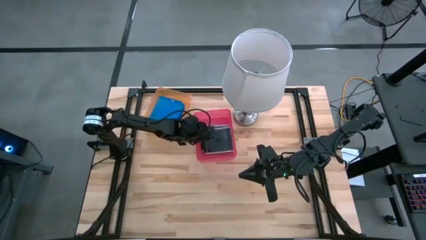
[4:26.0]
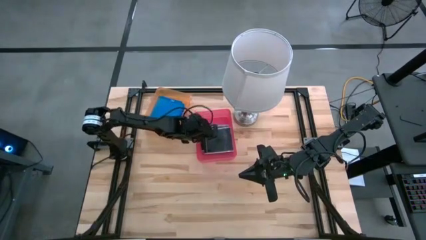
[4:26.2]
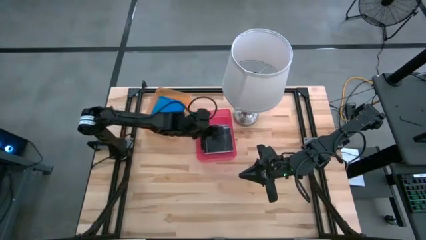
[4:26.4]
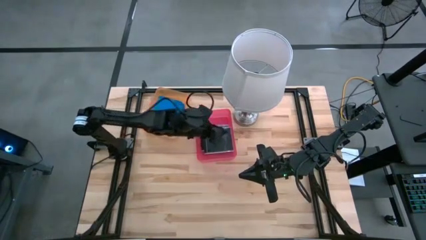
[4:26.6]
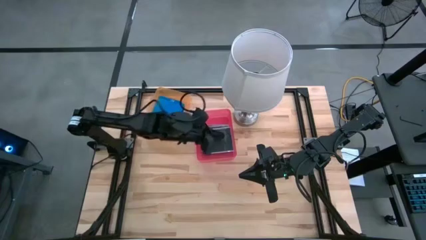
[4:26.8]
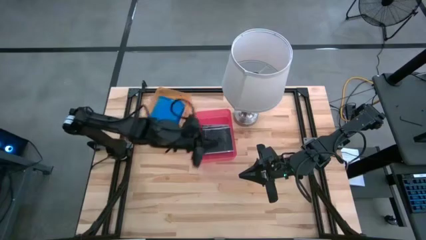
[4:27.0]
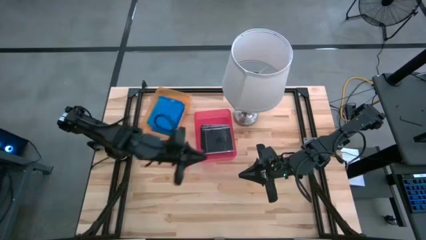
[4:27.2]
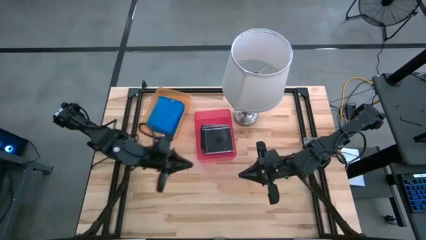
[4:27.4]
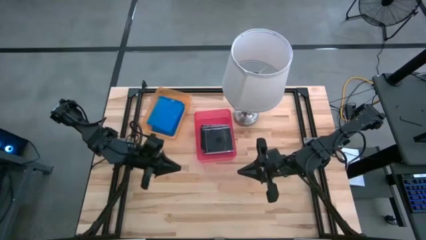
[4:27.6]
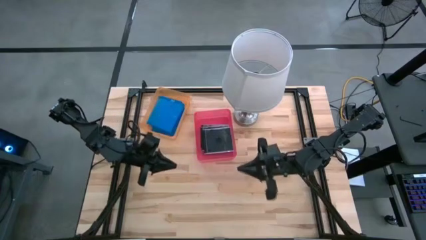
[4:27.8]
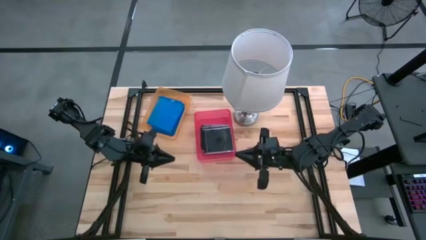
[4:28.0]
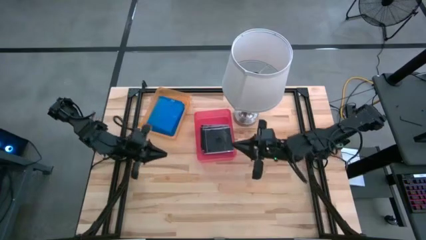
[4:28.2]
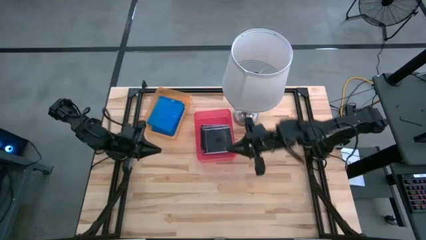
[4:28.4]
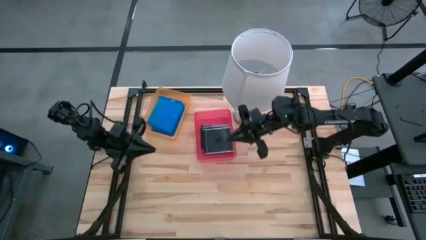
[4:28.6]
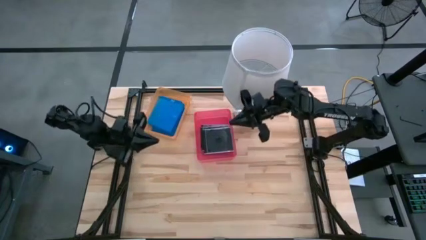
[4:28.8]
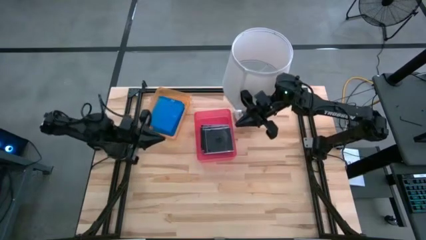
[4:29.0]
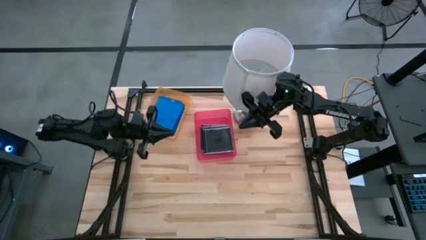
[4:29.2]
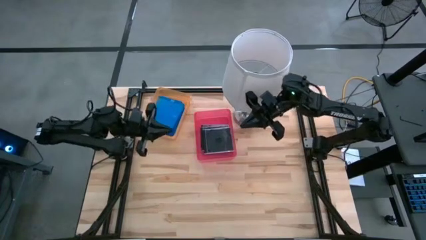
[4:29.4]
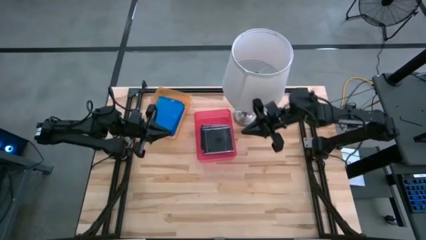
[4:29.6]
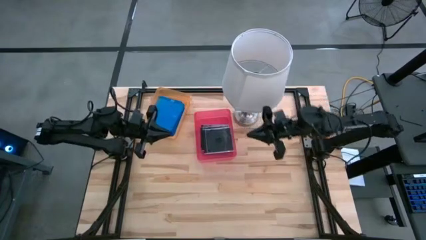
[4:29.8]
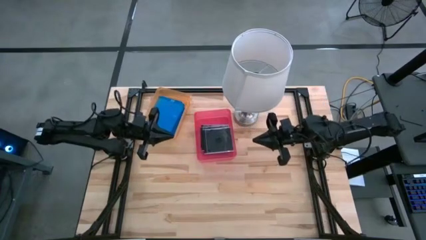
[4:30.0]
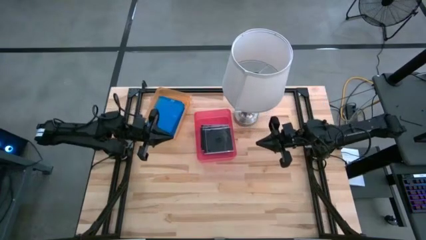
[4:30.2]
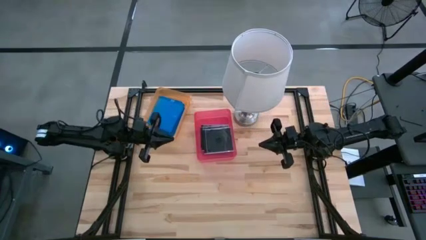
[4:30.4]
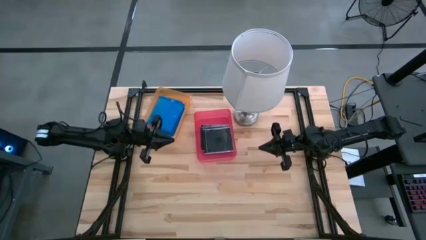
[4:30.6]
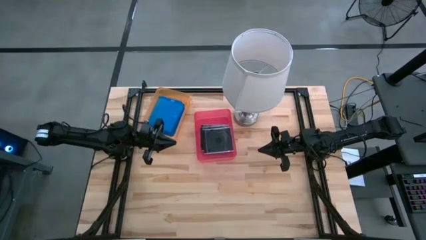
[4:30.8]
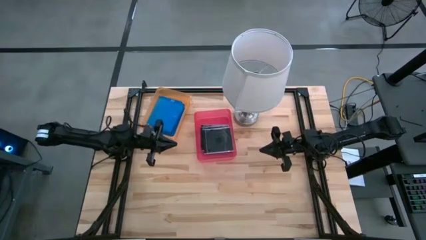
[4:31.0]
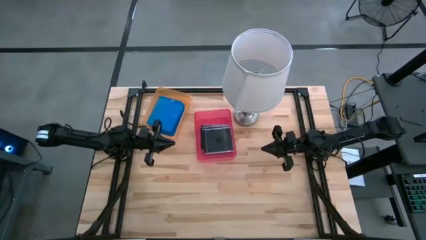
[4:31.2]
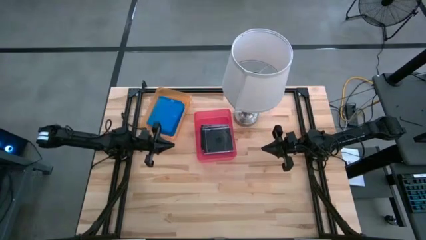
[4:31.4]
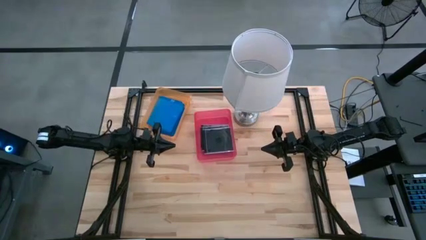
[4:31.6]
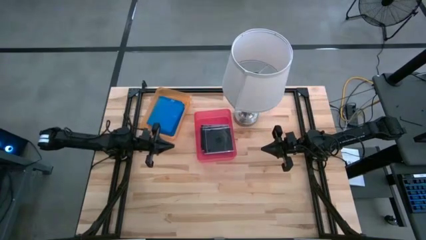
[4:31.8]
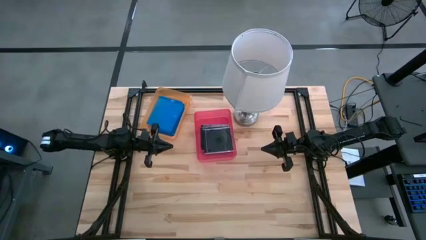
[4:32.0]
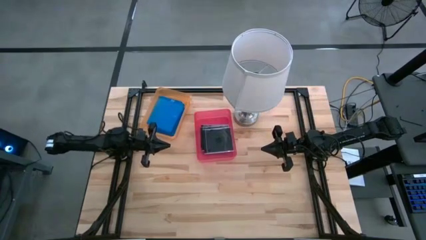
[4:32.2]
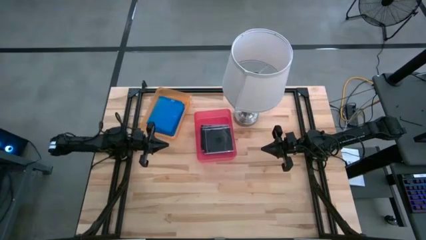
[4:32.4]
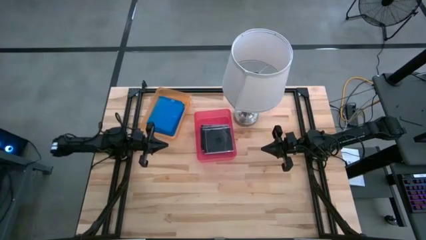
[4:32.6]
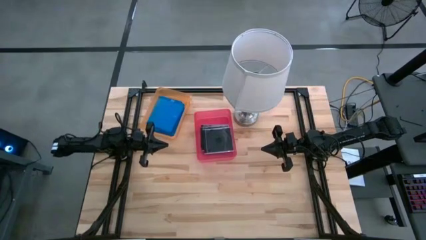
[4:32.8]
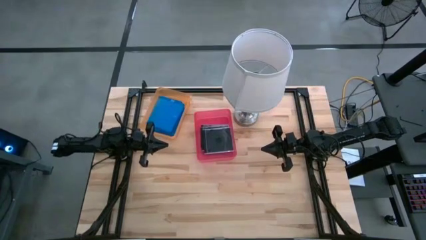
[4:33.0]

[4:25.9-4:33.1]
Task: Pick & place jewel cases by type
Return to Home Position

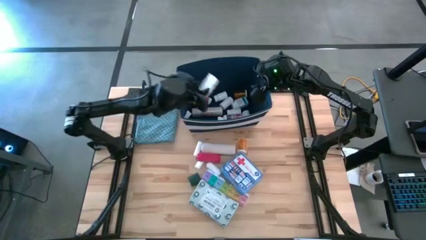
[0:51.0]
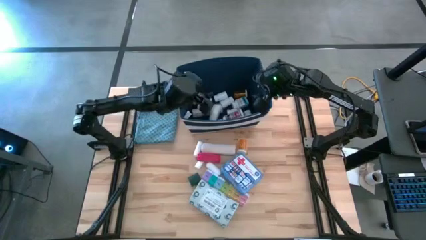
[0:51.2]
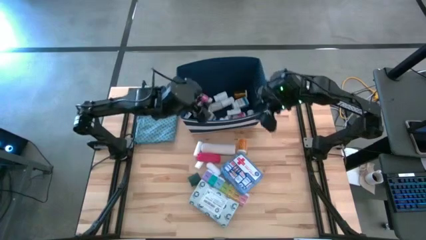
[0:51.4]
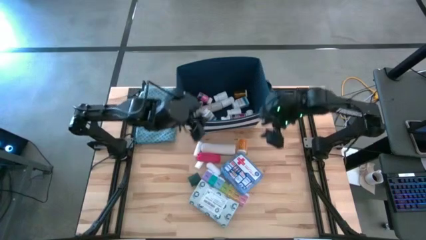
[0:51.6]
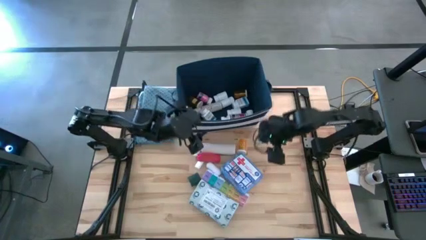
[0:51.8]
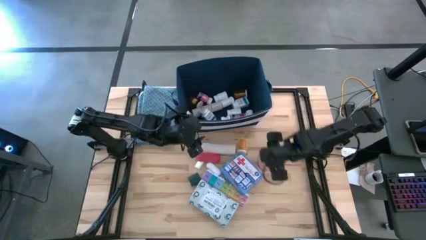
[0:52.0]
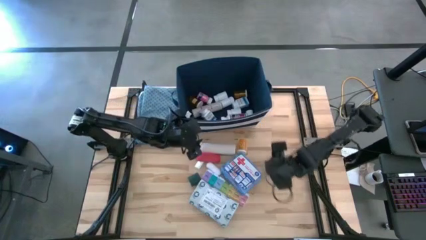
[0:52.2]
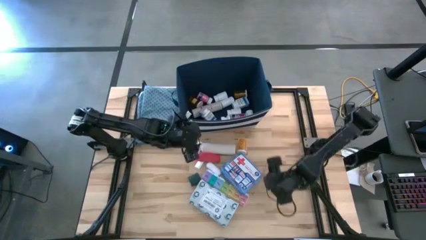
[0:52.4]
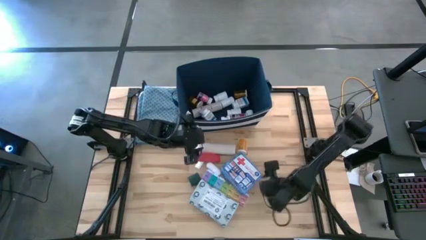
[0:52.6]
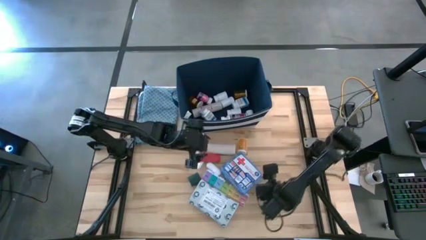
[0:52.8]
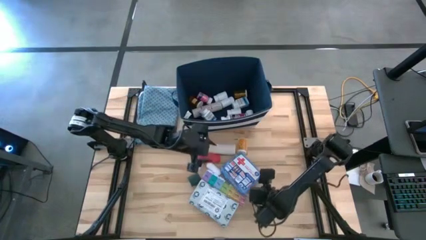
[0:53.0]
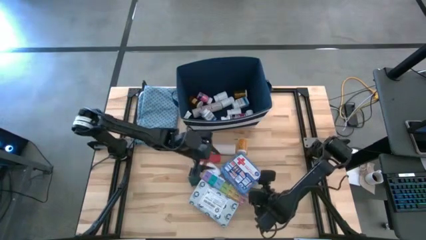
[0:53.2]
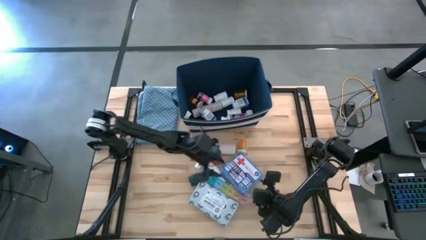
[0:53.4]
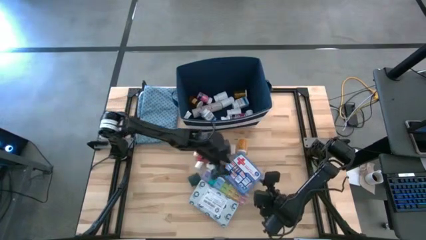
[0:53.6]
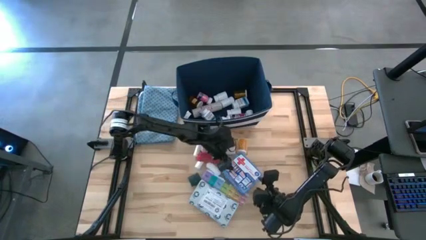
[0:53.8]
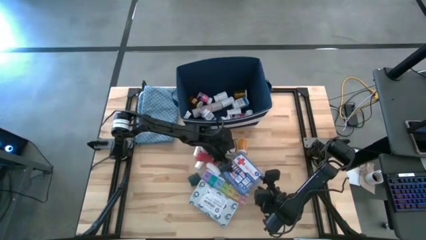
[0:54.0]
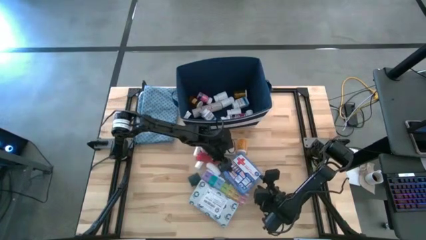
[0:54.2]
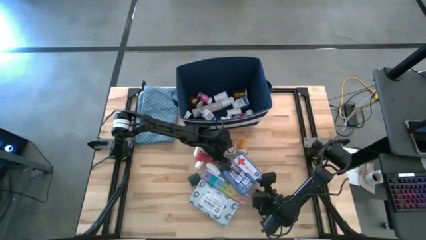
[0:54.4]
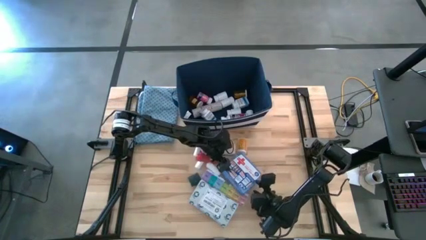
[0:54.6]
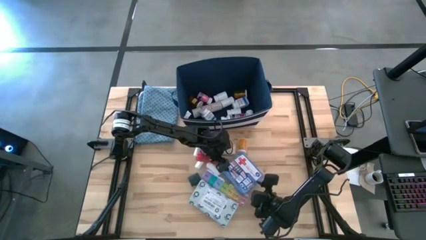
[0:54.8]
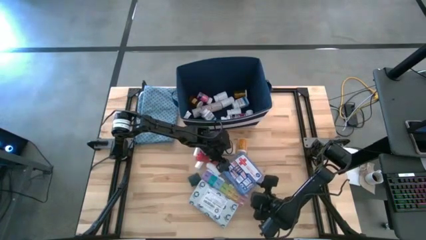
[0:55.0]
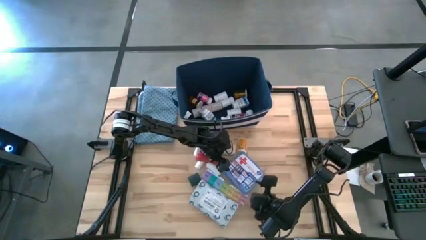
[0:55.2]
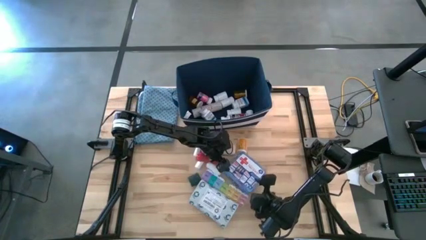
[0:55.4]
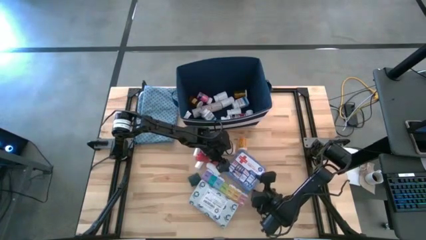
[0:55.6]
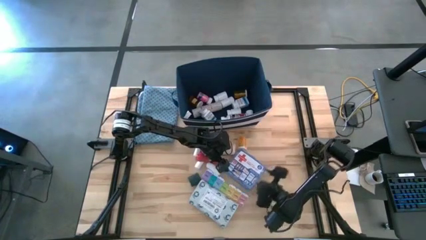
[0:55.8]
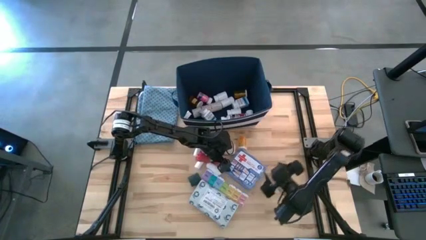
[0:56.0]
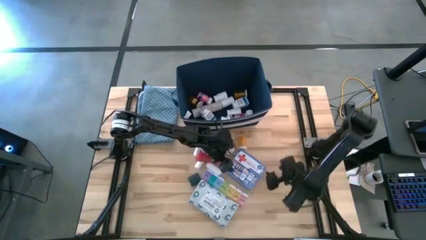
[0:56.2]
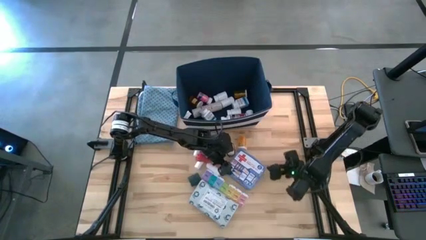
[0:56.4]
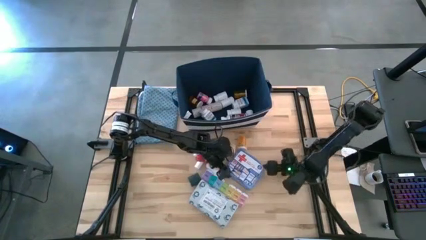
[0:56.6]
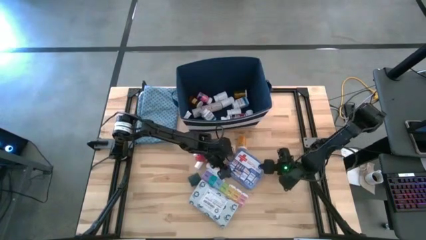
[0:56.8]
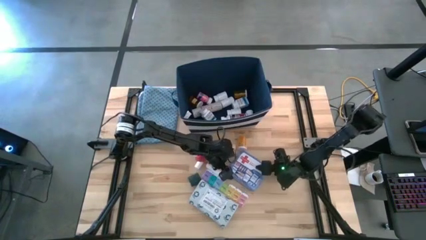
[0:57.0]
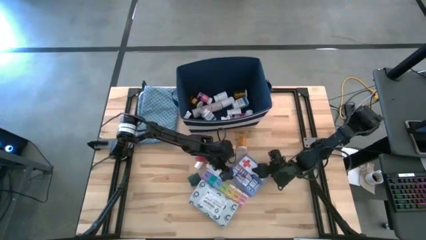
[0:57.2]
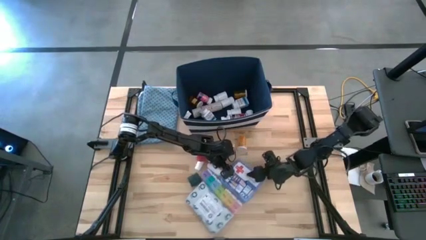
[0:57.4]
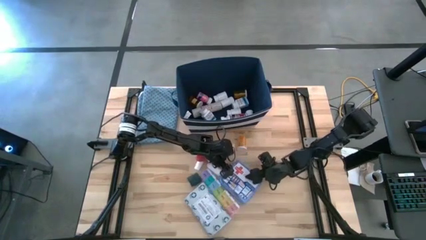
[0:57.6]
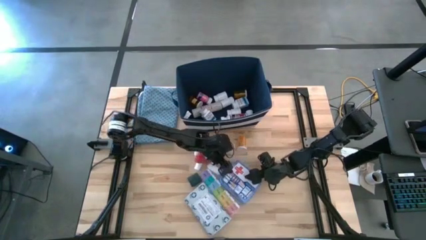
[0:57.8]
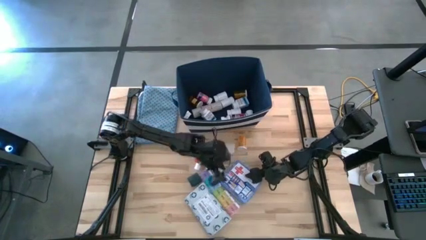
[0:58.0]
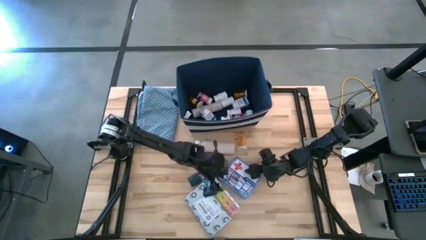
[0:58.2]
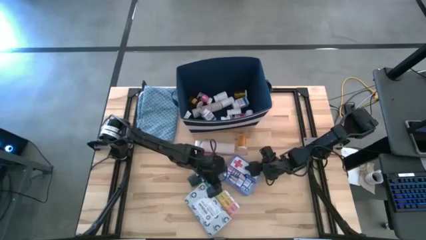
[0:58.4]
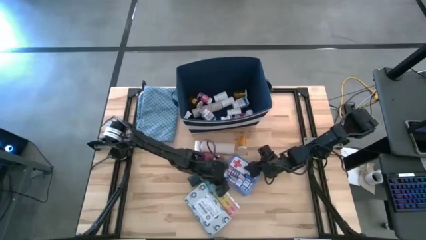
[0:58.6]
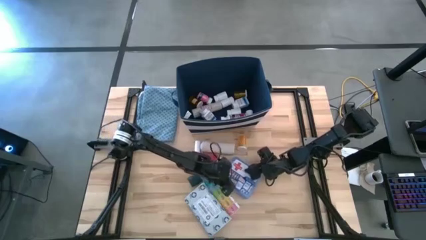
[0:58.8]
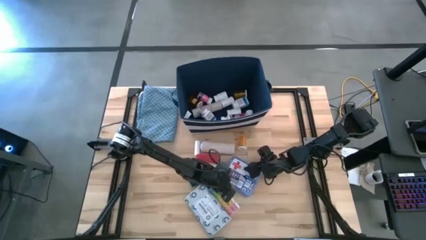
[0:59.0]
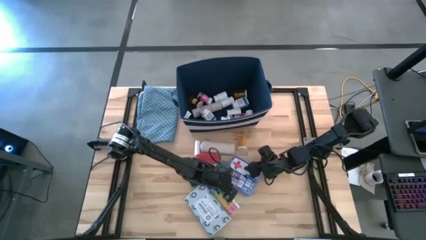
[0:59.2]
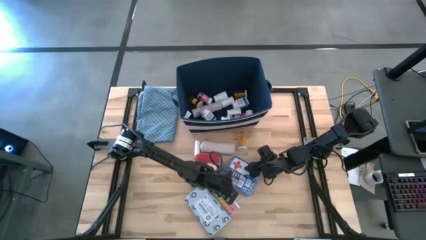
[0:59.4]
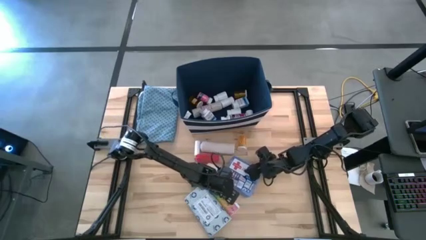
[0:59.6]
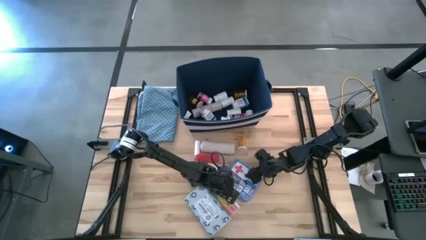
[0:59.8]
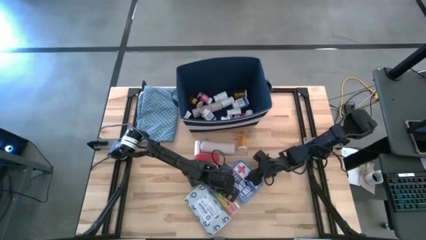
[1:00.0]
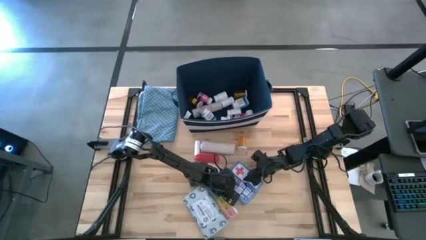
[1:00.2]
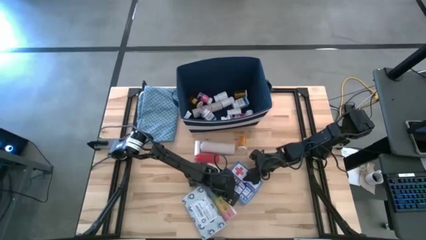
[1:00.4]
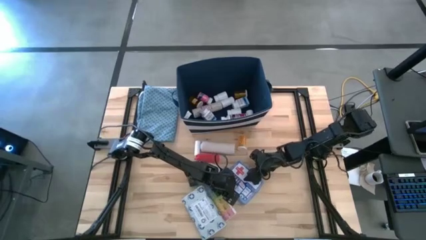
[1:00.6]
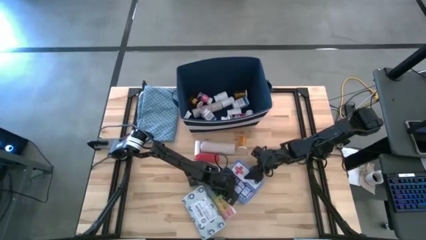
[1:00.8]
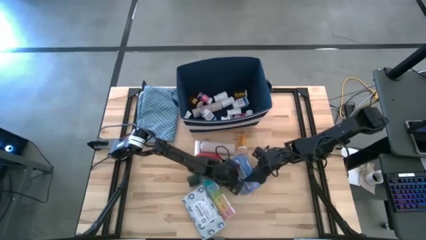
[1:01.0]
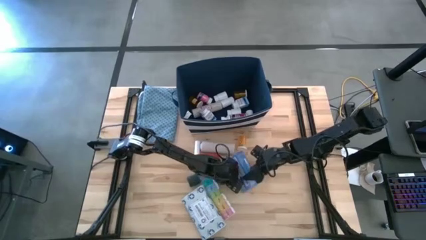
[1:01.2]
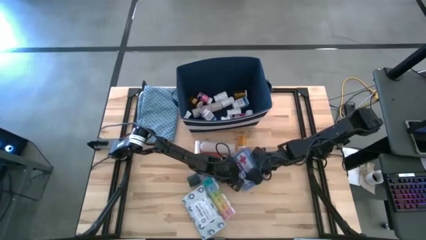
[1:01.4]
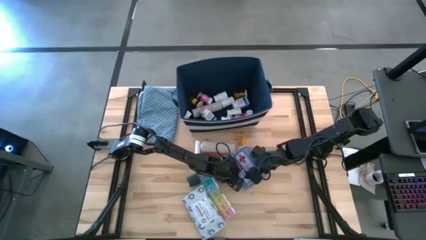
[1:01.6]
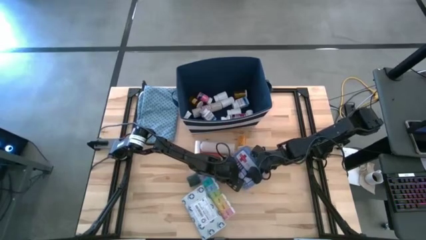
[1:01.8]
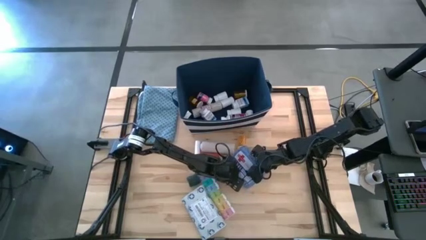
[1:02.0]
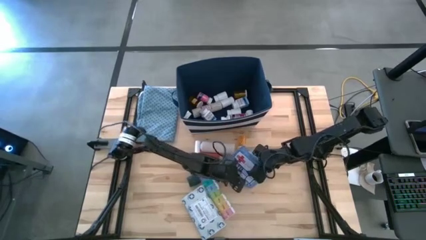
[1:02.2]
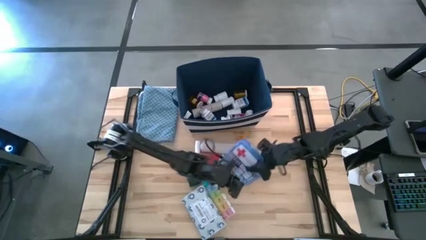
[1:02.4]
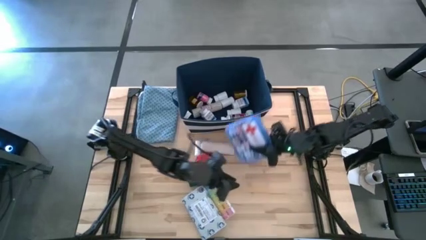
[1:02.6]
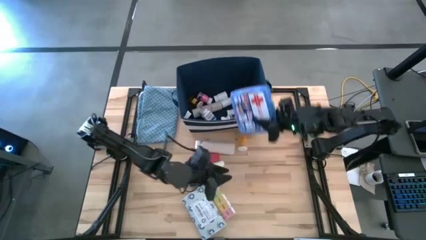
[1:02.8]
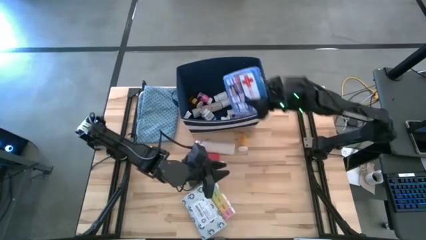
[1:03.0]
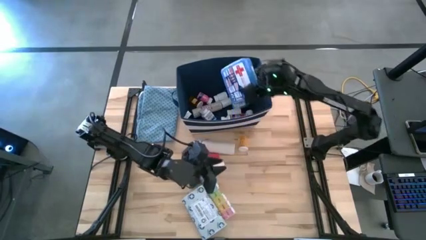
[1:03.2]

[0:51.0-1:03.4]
Task: Pick & place medical supplies in basket/bin
Put the medicine kit into the blue bin
